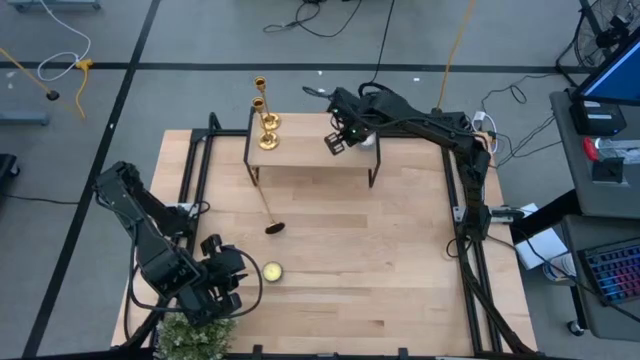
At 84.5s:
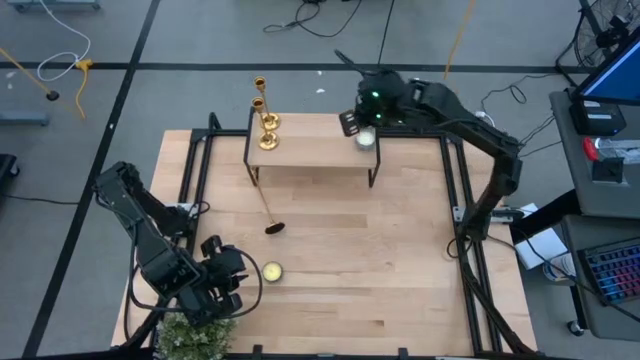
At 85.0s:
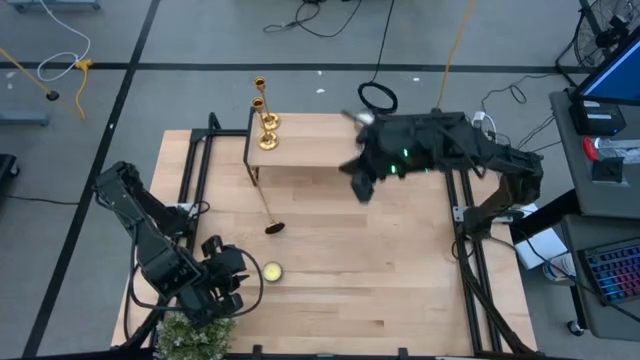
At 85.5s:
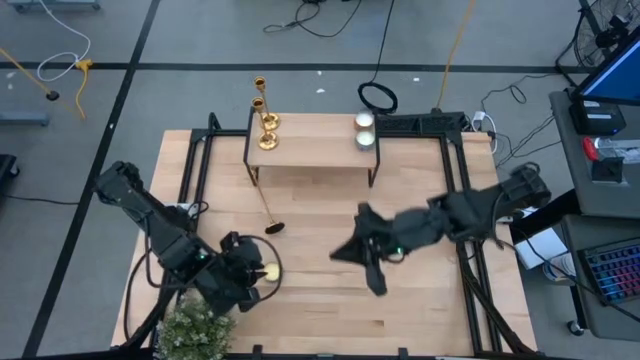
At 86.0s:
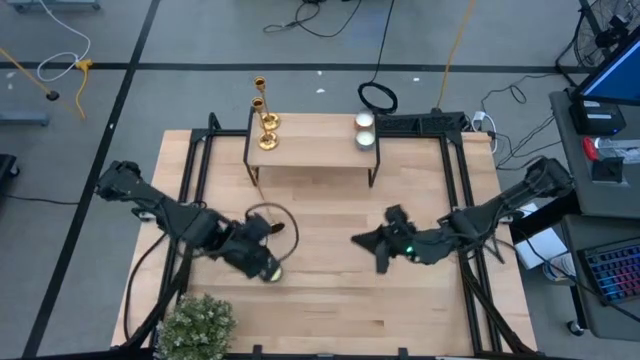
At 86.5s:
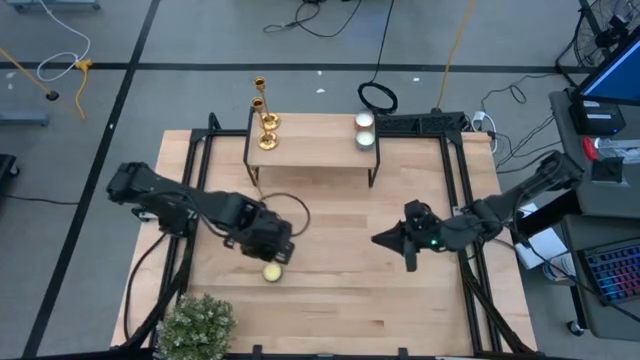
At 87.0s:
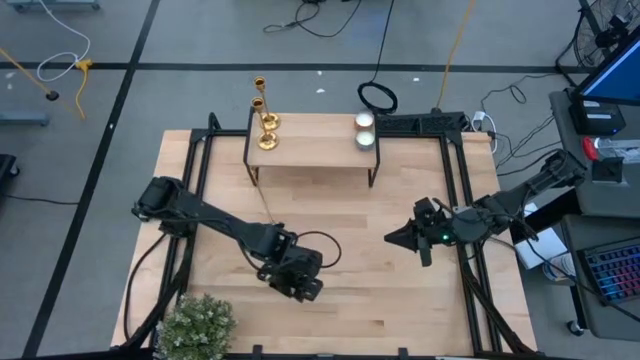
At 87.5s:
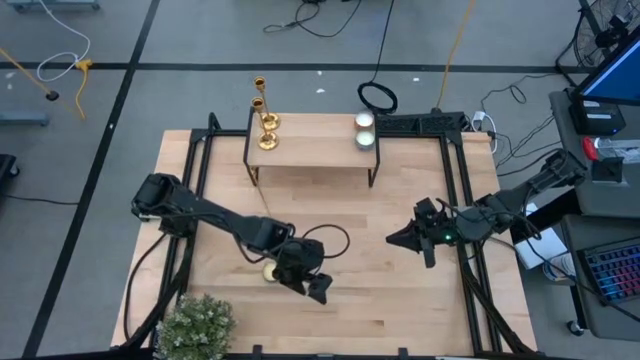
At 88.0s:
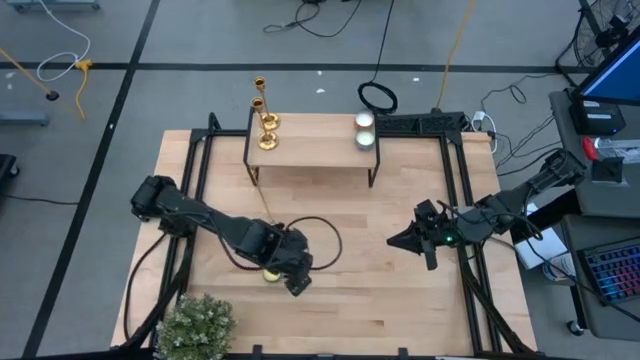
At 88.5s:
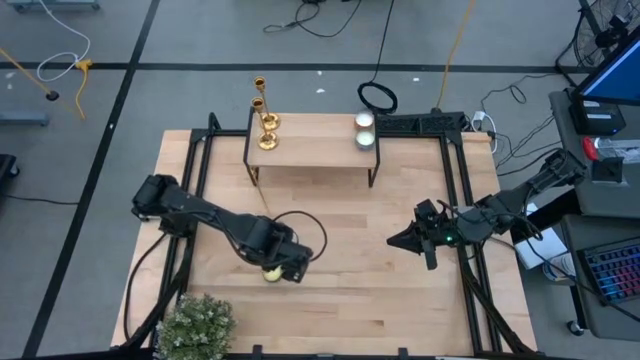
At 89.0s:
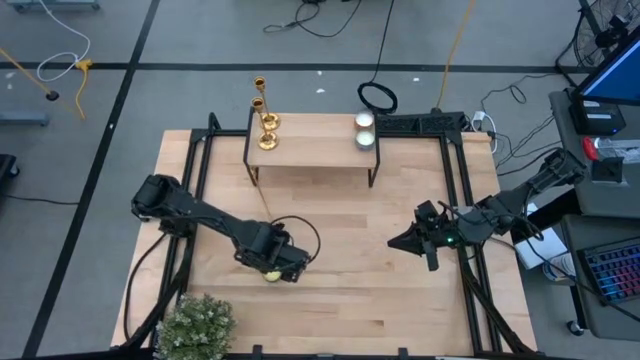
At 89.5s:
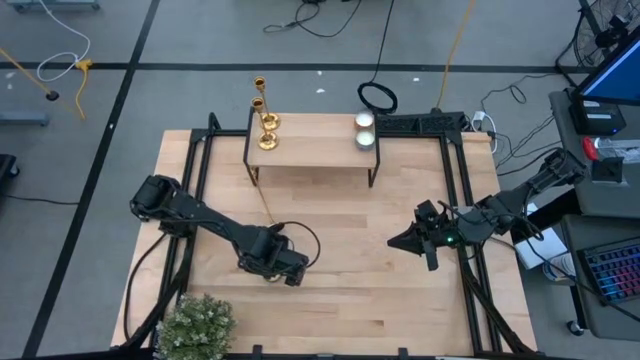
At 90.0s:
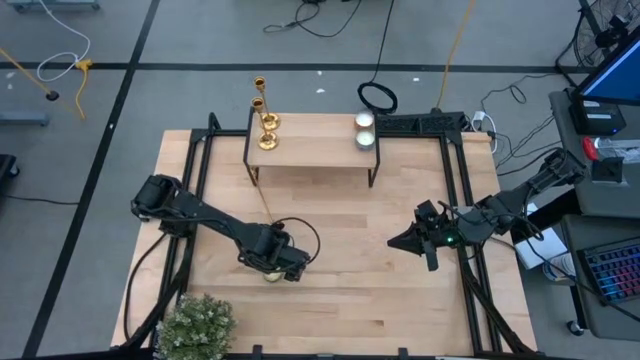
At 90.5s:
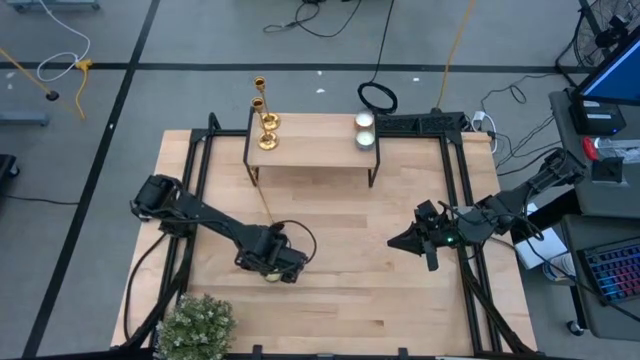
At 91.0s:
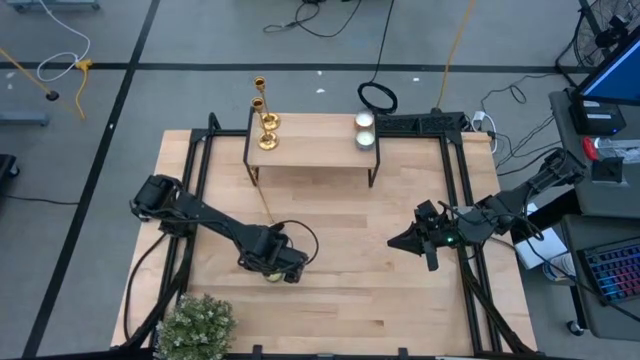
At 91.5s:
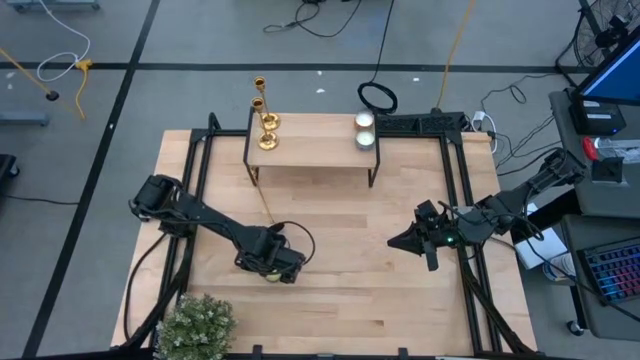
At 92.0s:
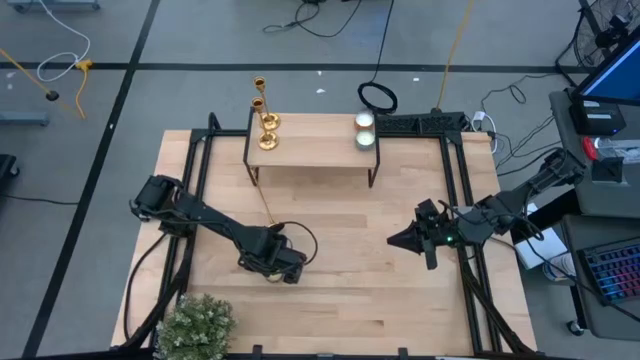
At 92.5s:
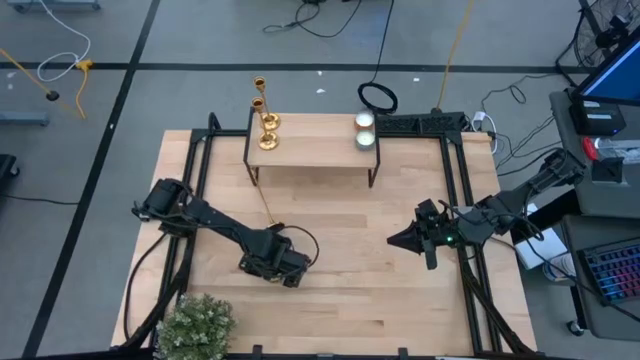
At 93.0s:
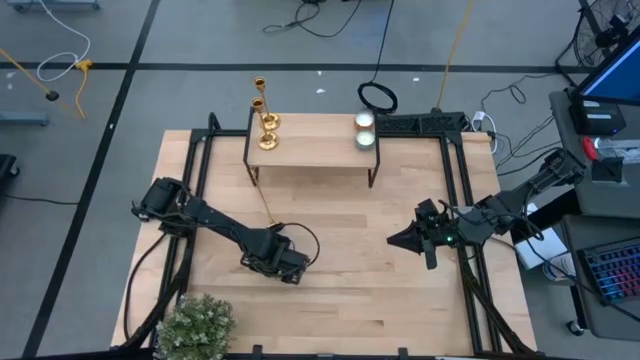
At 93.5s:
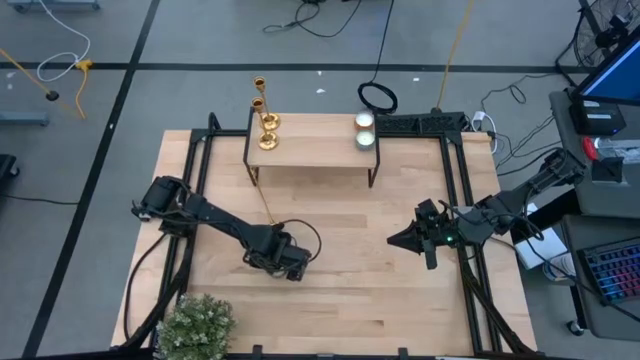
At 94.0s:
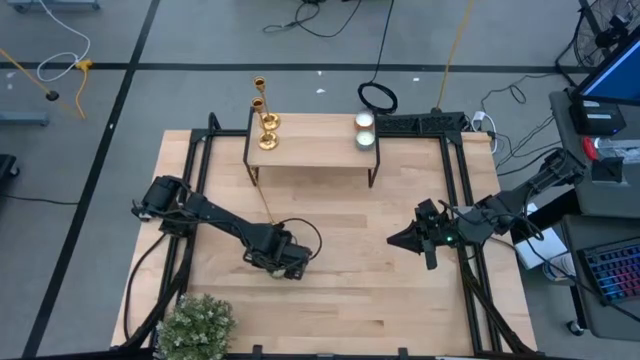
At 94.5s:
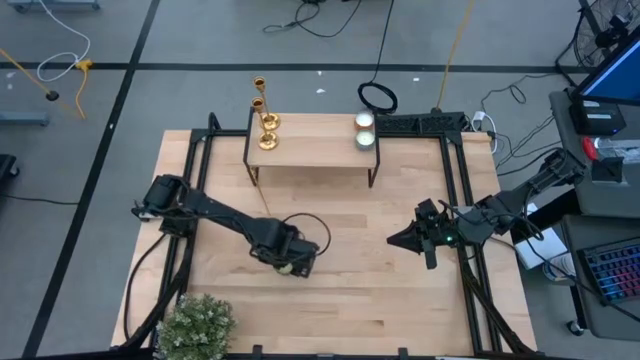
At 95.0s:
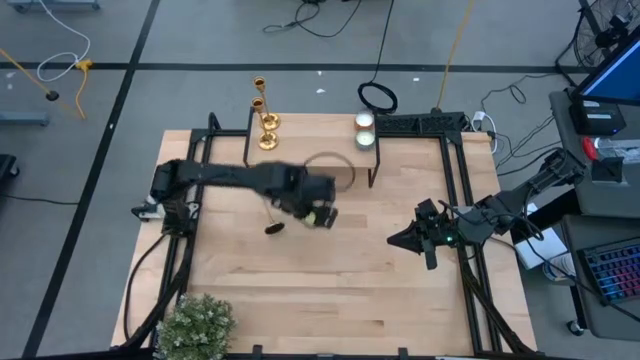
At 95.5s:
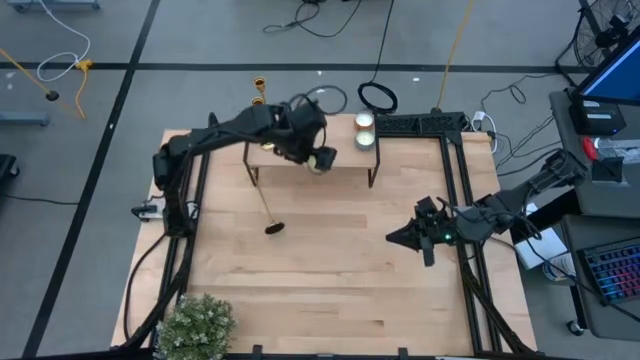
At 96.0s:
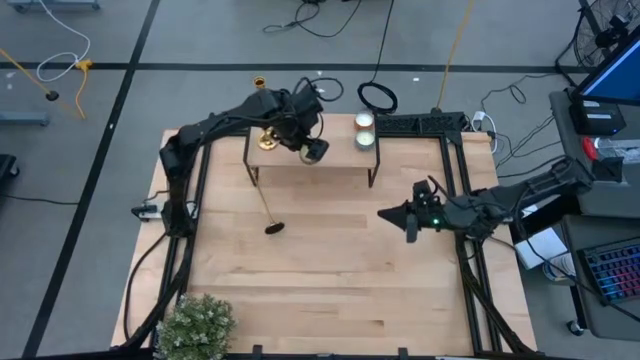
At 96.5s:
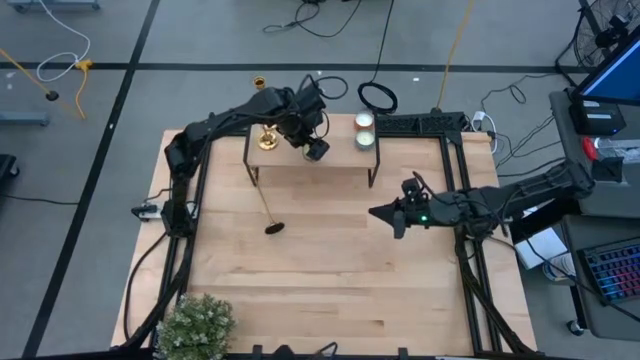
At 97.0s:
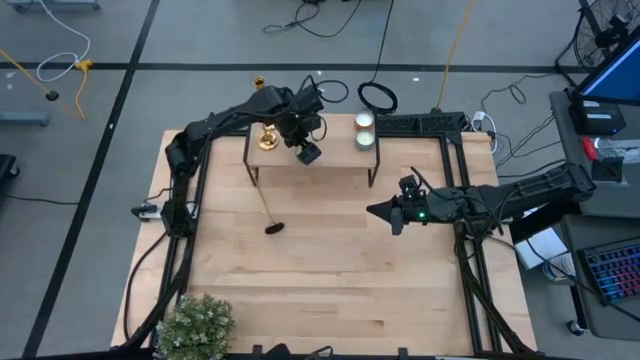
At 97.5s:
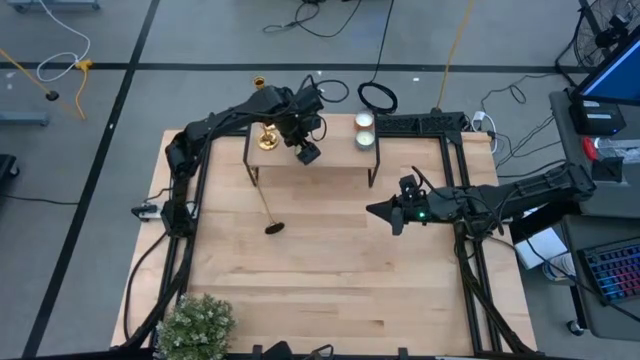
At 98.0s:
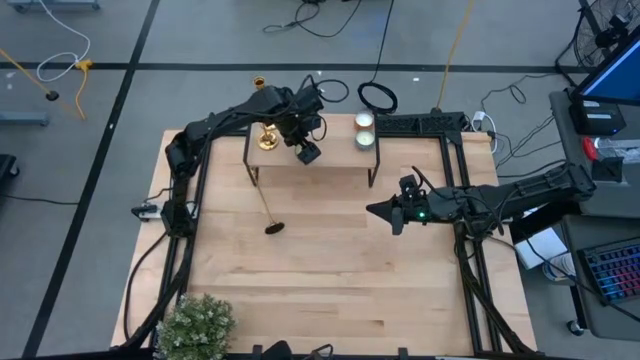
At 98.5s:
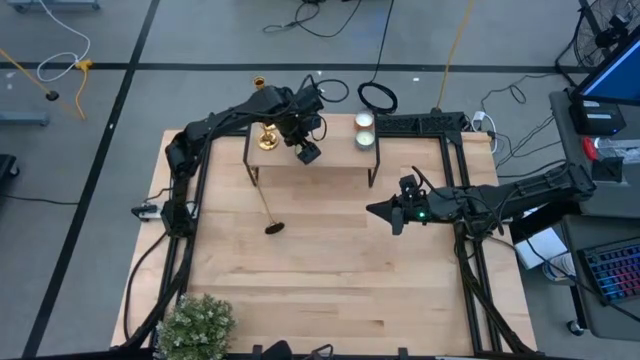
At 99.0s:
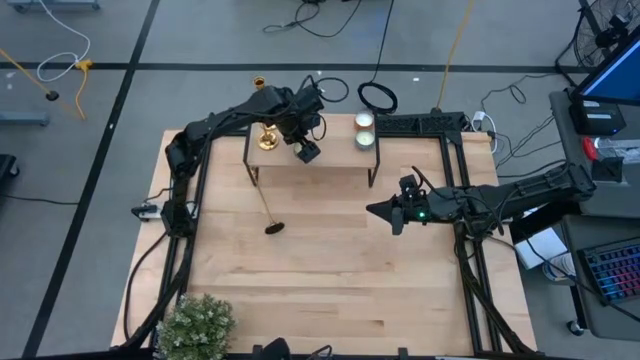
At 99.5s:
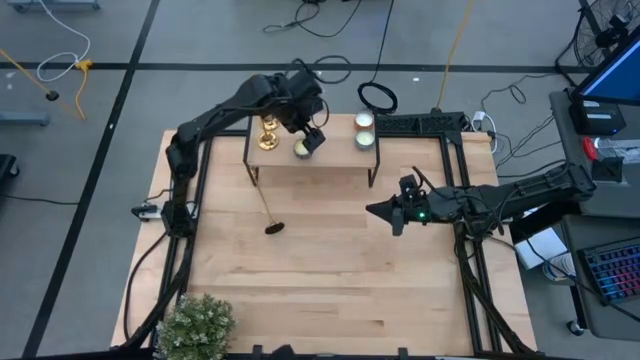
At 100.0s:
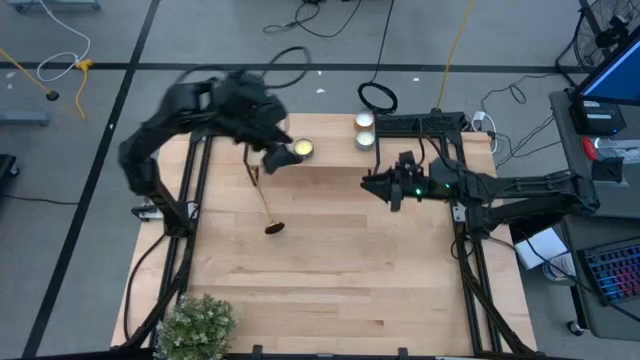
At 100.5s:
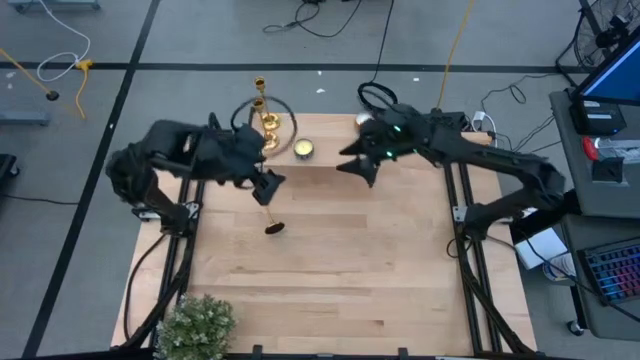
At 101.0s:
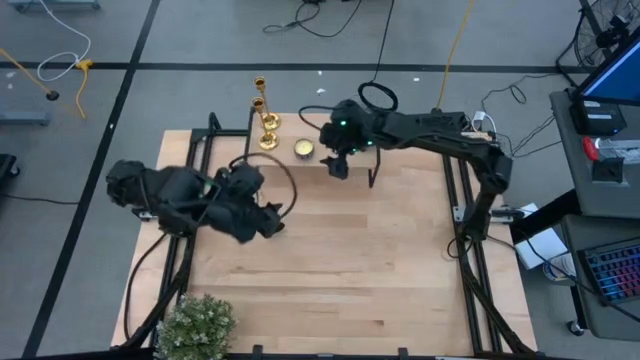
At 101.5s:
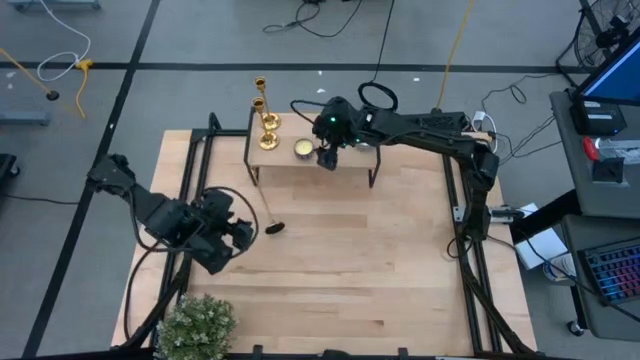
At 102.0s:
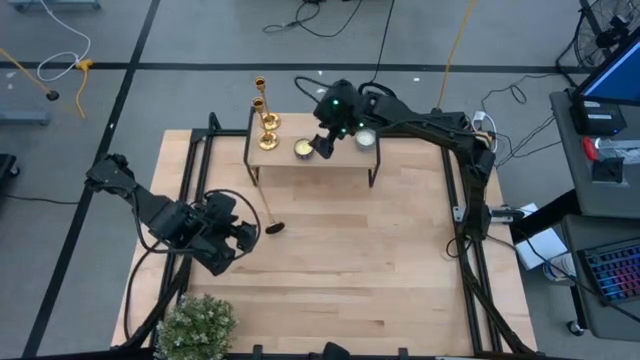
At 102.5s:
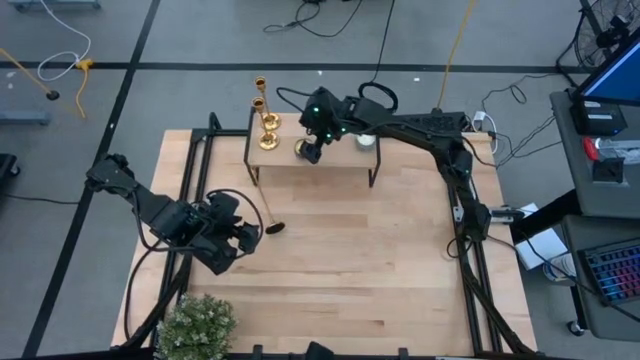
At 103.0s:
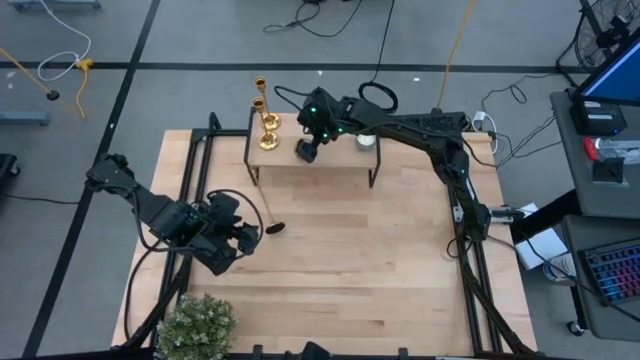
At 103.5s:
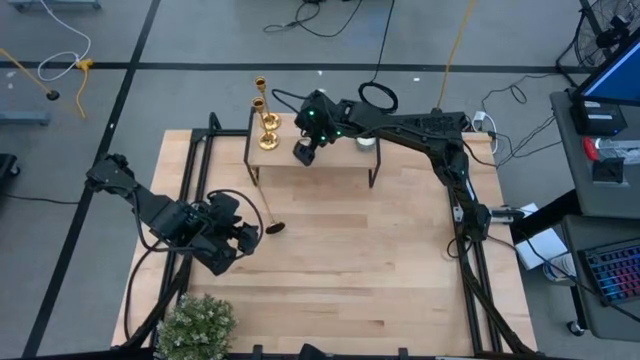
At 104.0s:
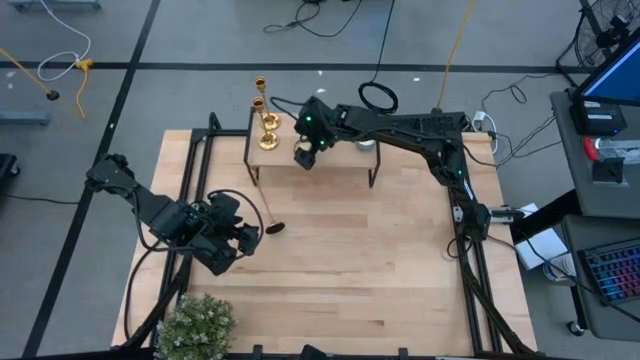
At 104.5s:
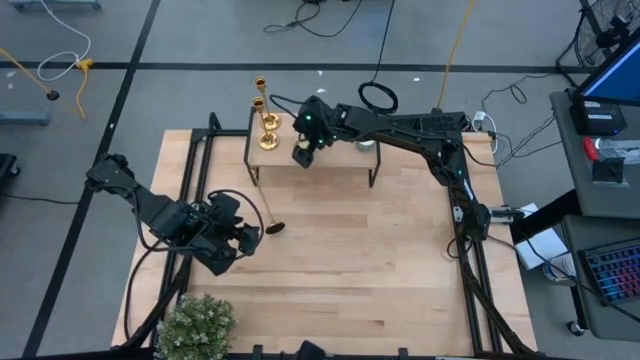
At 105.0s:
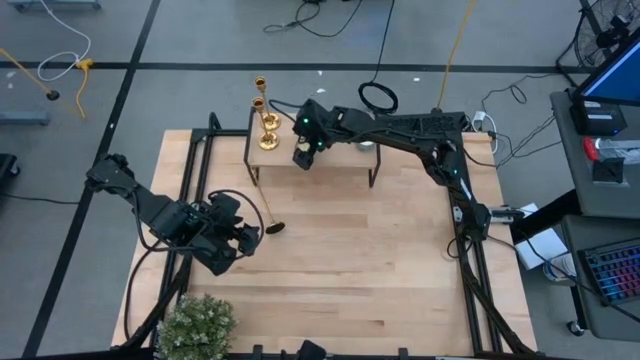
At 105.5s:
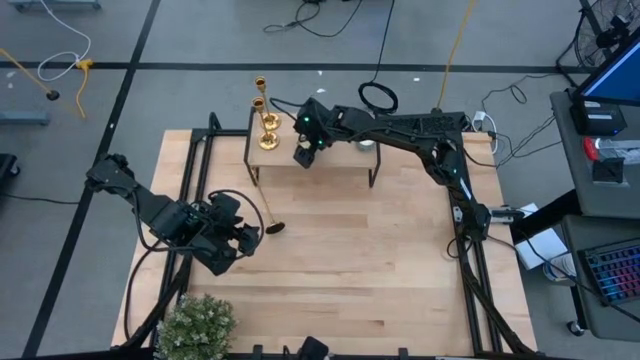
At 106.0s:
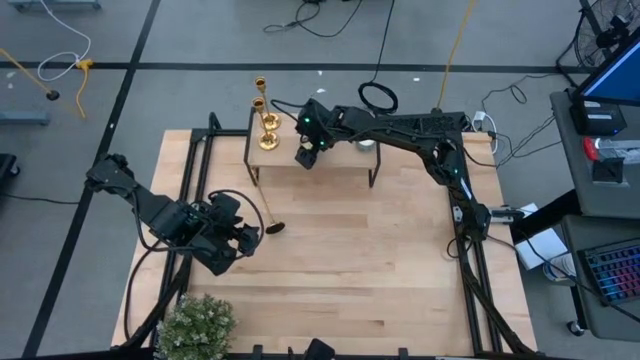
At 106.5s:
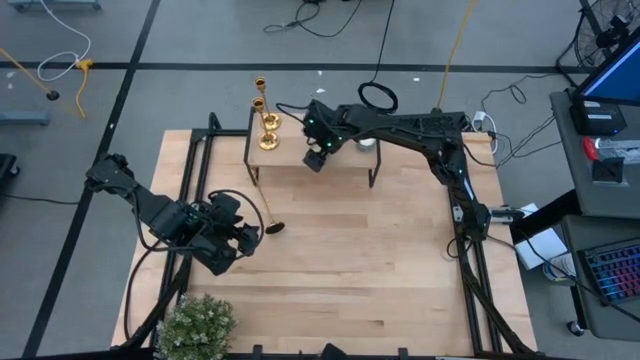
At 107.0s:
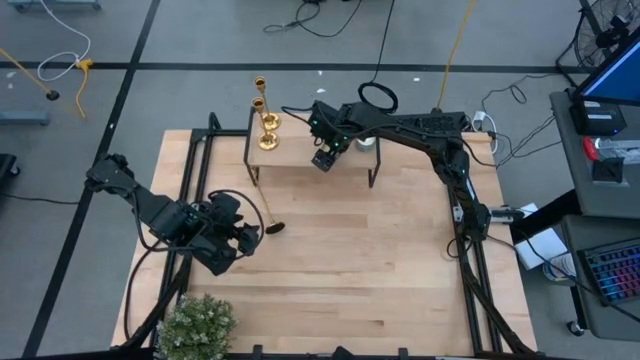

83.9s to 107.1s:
Task: Pick & Place candle stick holders
Put the red white scented candle on the shelf
